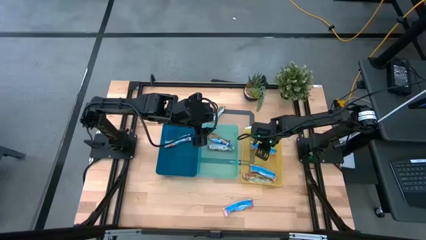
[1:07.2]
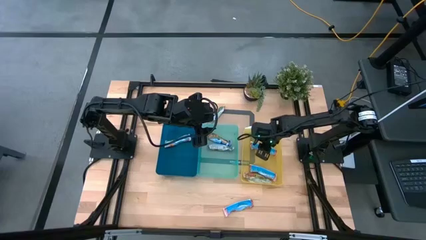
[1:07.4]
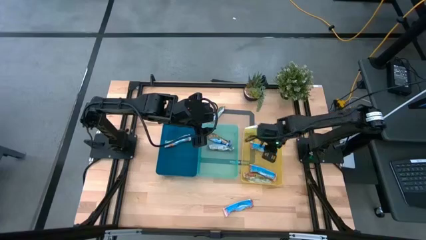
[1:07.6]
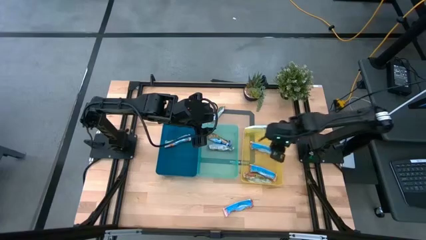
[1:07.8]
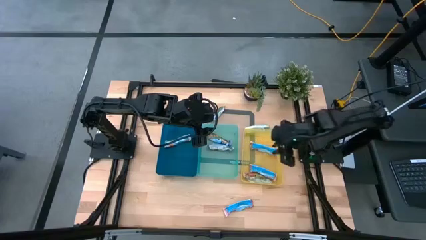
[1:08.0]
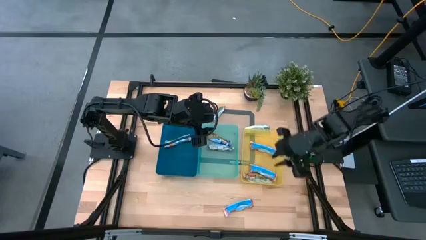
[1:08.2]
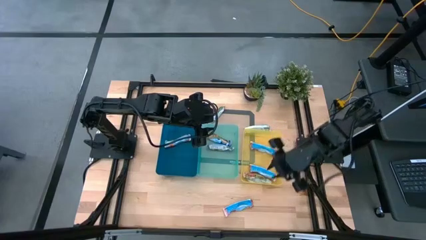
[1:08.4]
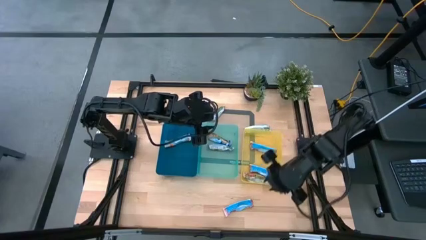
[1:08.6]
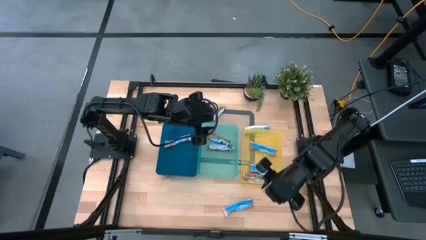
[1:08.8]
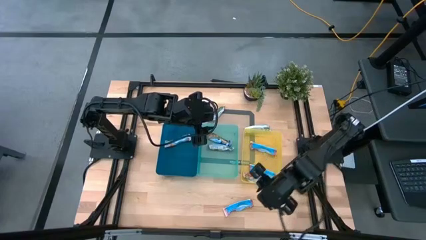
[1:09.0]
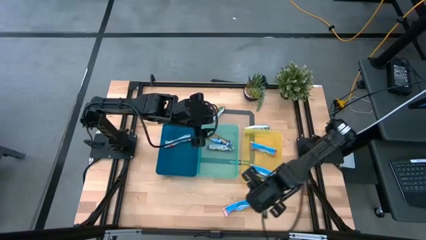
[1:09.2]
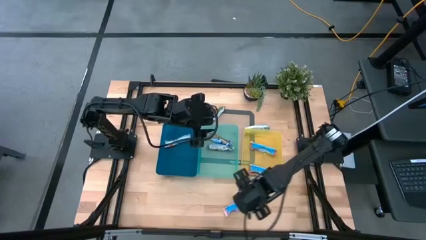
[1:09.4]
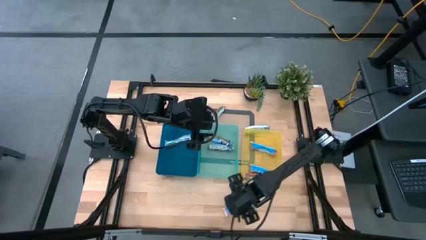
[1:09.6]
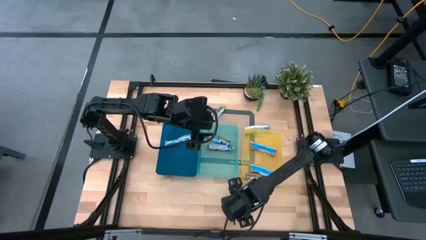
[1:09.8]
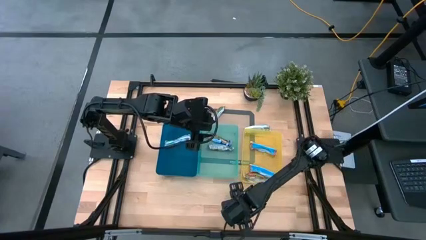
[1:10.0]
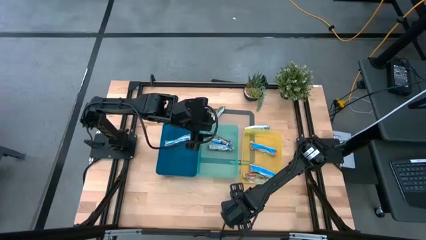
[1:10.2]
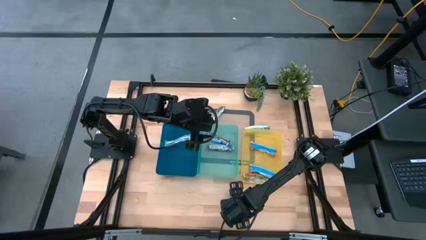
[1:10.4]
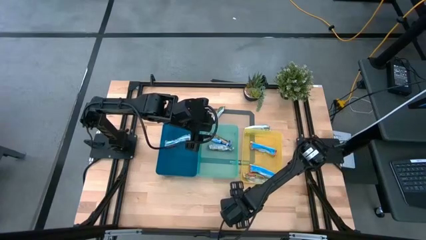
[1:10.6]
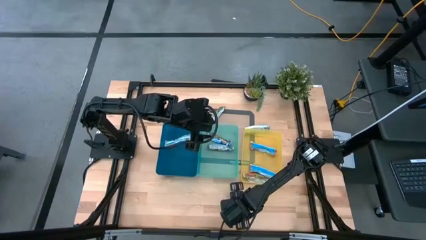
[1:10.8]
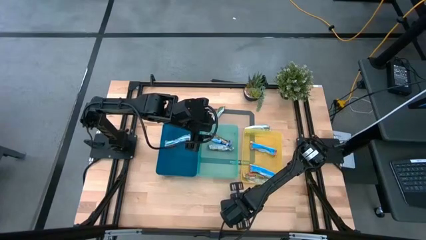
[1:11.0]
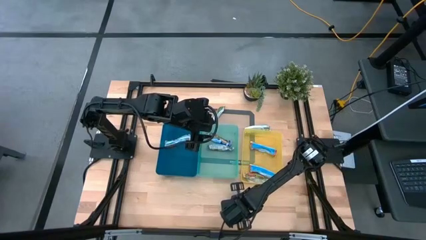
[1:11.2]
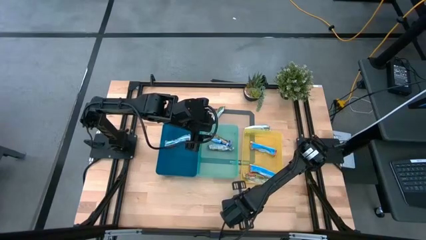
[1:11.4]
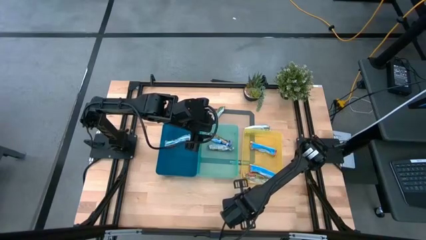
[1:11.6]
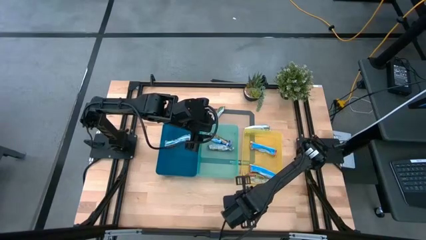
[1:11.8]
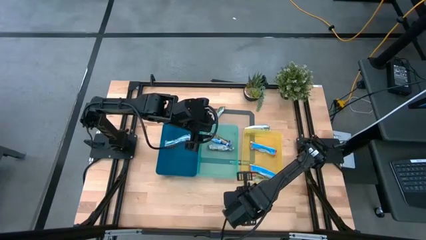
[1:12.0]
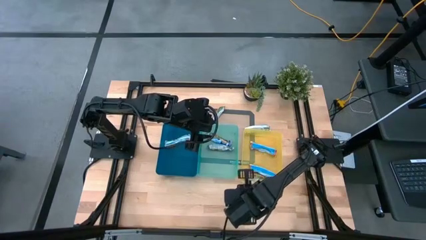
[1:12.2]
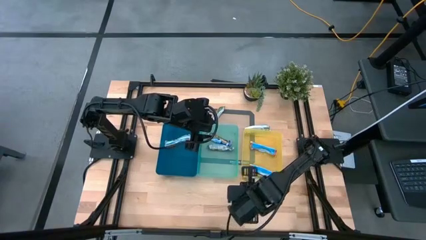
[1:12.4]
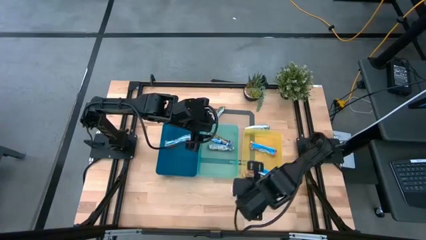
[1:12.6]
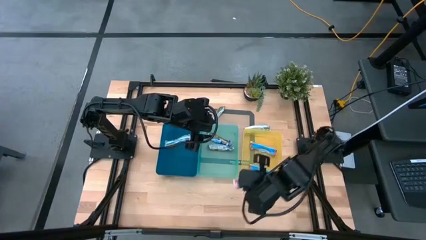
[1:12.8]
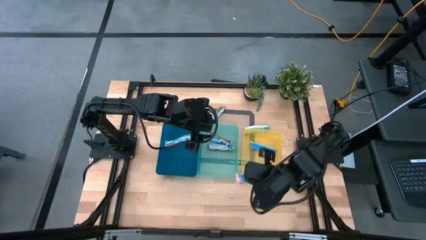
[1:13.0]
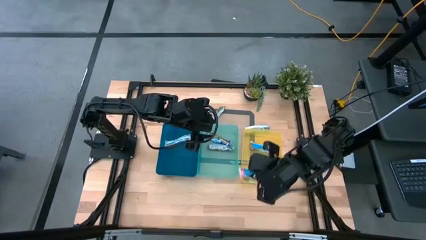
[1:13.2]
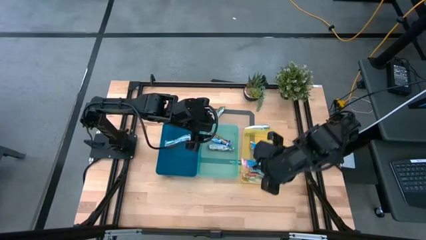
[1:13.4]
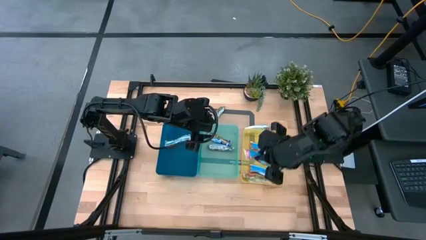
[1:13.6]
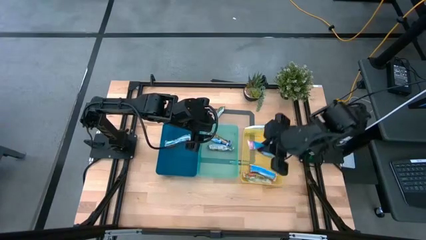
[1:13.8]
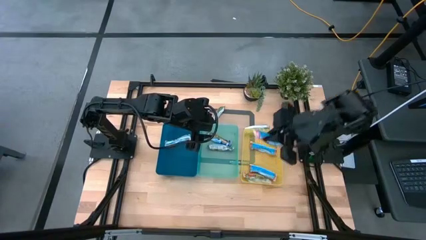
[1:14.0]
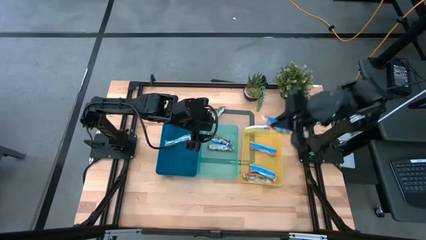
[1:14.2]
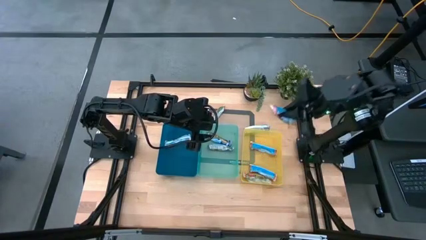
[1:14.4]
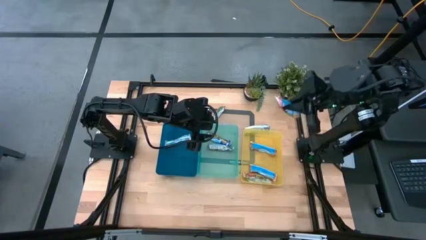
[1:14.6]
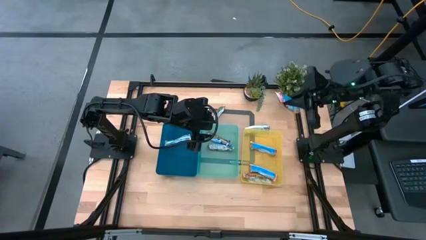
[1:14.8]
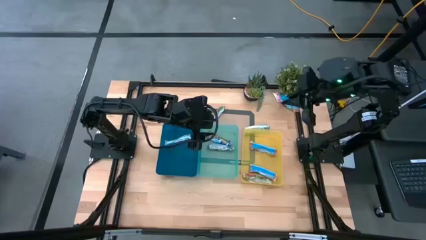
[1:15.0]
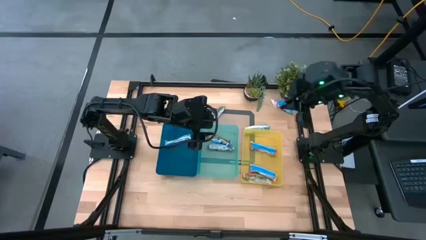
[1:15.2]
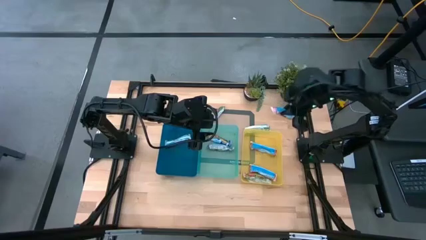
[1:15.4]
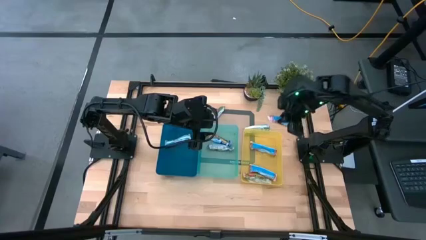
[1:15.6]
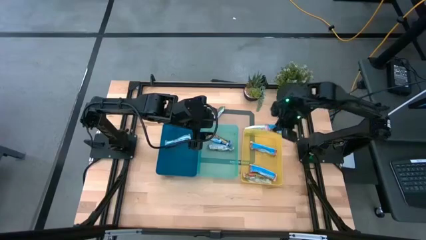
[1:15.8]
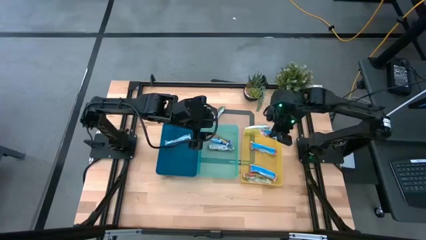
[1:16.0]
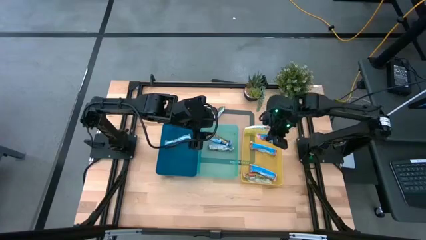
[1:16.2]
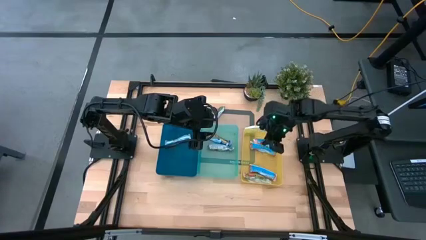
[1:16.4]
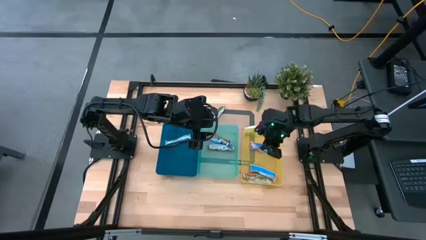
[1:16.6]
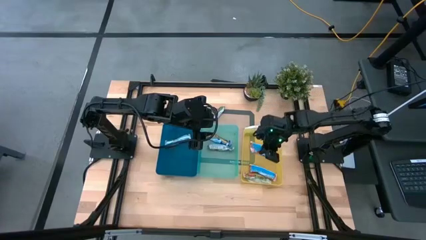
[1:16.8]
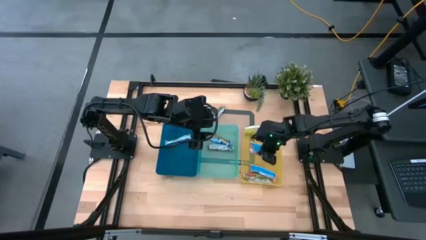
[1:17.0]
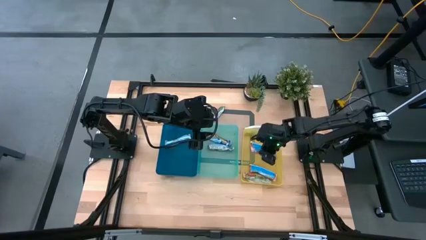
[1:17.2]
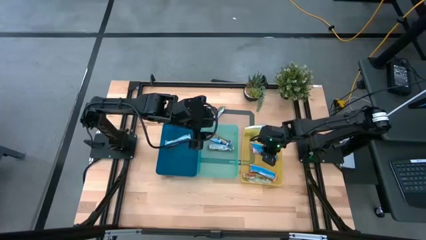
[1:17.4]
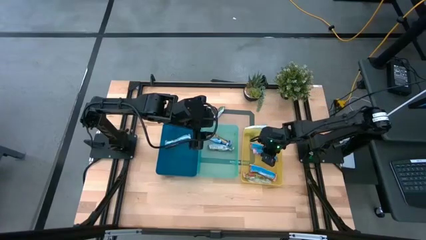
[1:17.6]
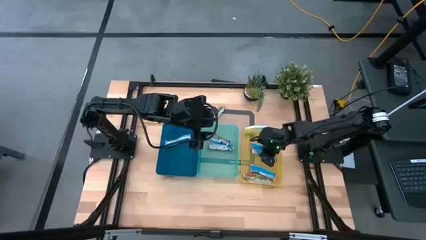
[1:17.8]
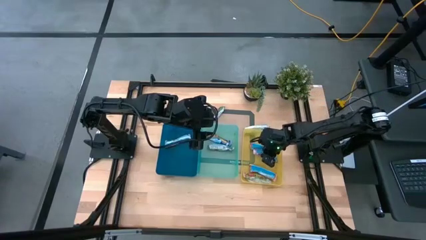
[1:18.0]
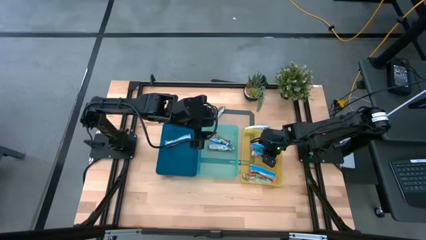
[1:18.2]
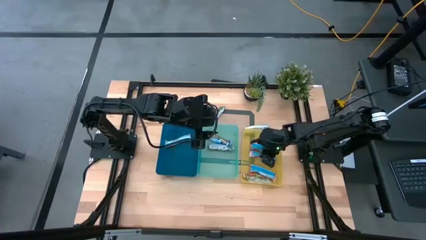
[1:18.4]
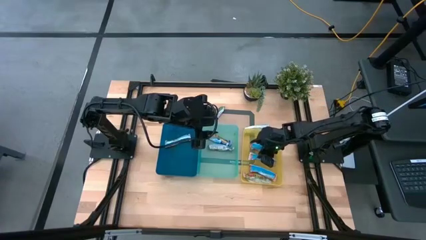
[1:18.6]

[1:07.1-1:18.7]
Task: Pick and place Granola Bars by type
Put the red granola bar into the yellow bin

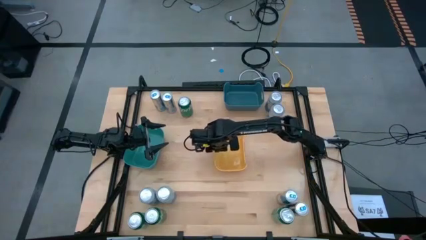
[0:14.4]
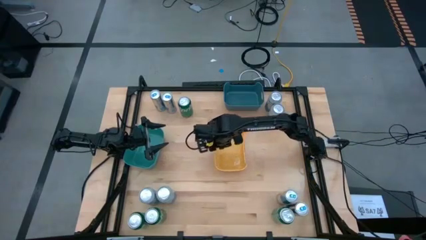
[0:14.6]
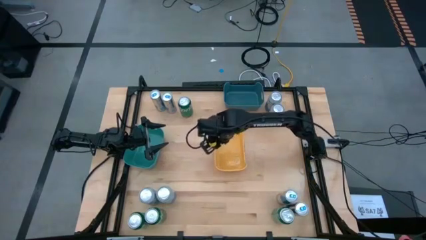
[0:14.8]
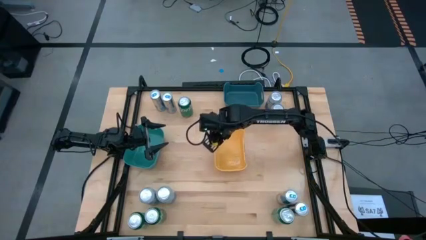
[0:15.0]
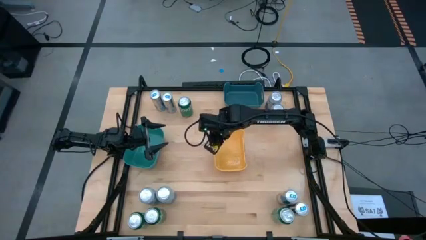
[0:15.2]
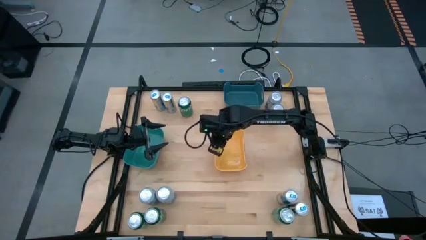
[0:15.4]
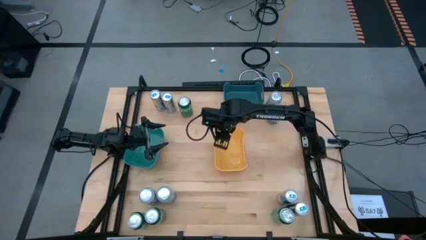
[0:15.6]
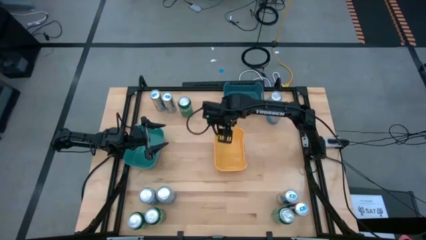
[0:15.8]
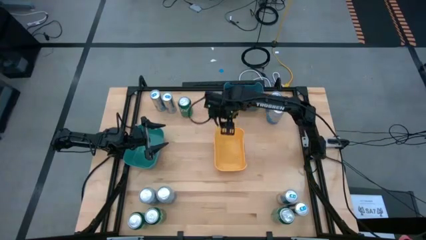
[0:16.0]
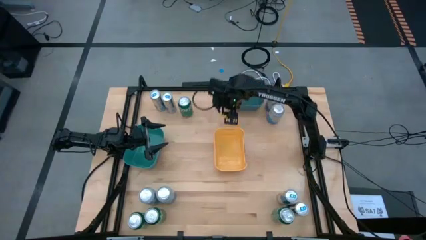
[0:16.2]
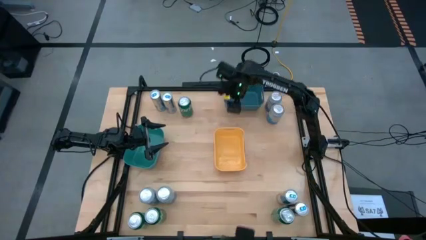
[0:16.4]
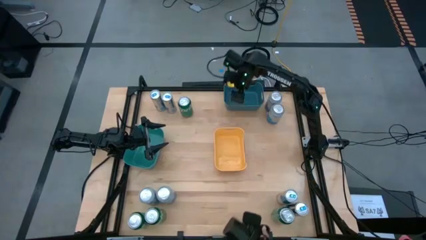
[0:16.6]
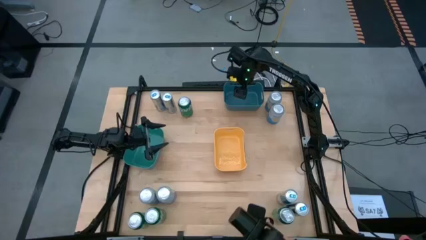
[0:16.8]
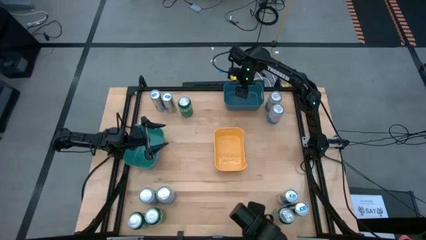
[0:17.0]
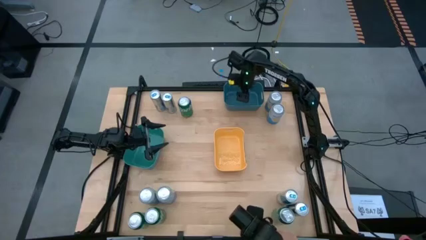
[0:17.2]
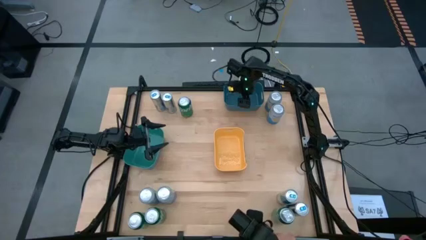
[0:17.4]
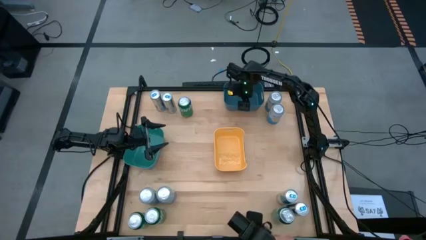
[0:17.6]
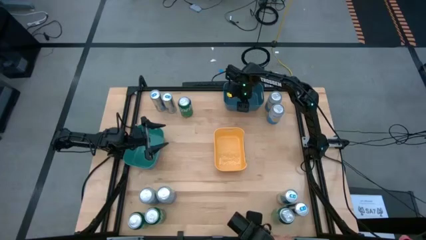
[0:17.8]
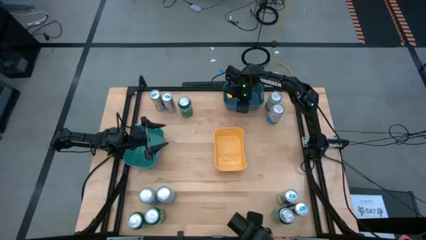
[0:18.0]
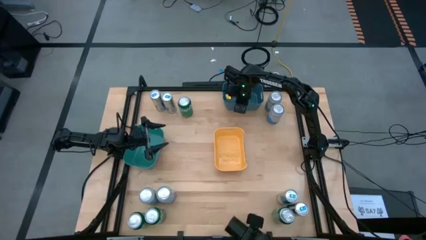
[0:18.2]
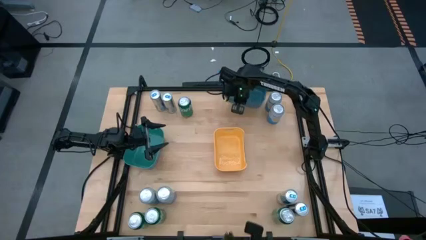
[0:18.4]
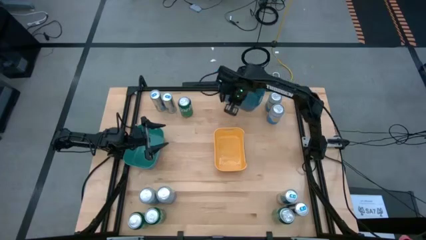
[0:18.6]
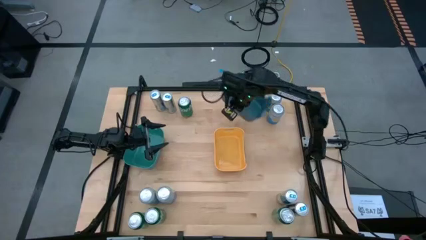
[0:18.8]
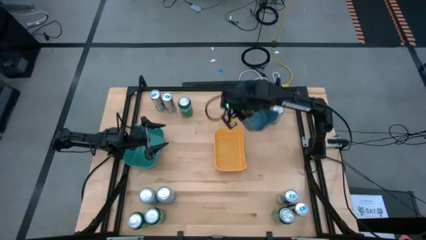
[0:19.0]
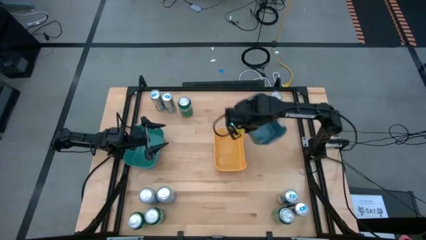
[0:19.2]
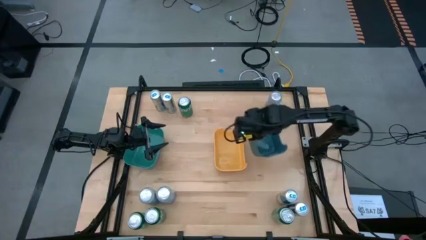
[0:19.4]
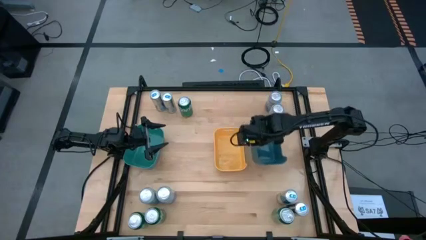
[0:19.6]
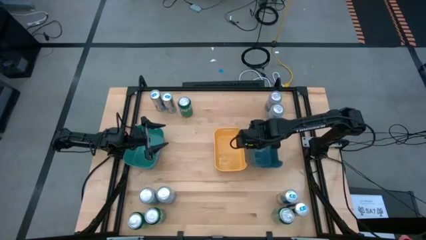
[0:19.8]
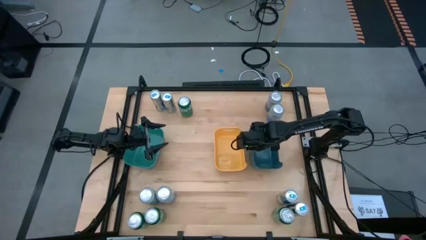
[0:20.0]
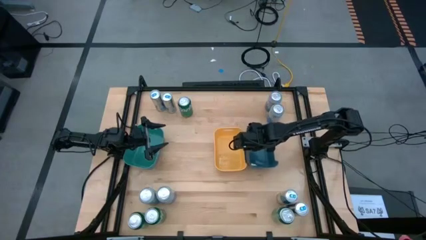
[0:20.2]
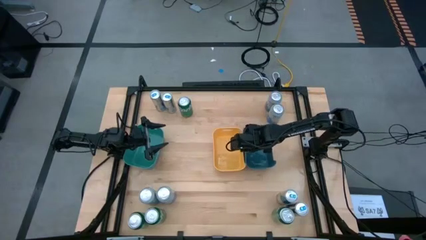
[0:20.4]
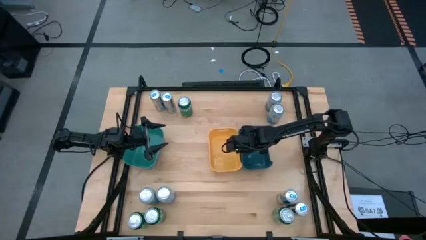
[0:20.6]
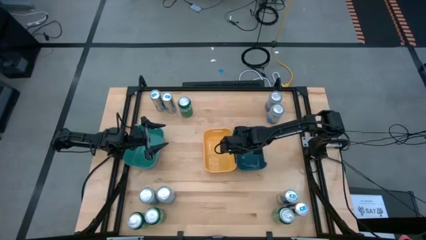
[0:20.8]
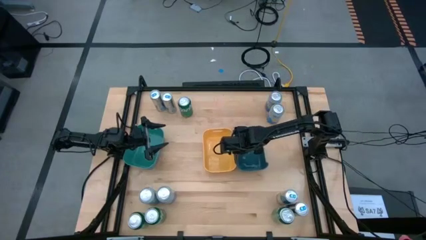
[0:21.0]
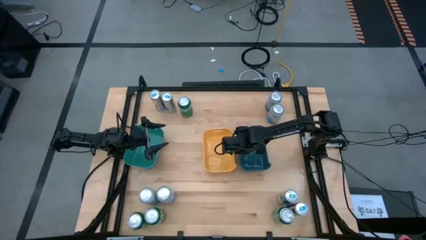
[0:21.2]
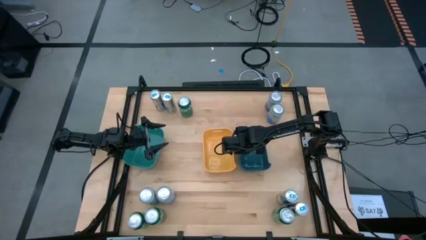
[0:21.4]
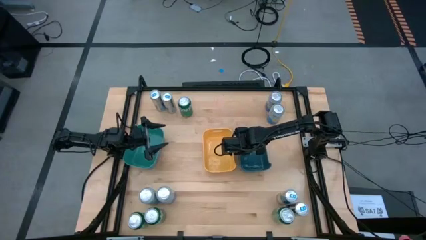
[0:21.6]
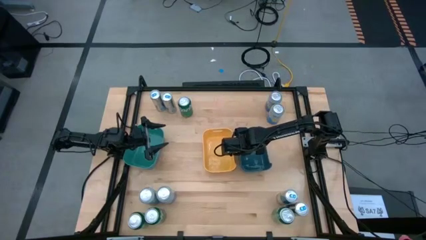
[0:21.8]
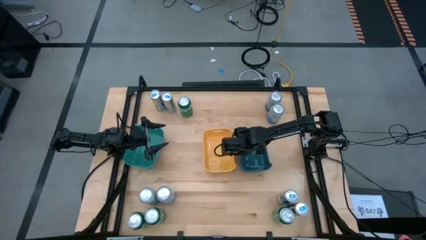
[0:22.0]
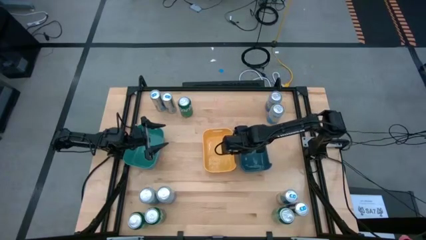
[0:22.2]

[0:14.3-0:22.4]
Task: Sort soda cans
Move the dark blue bin to the right side of the center yellow bin
